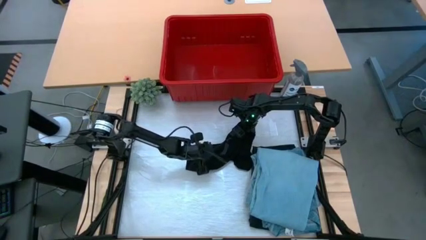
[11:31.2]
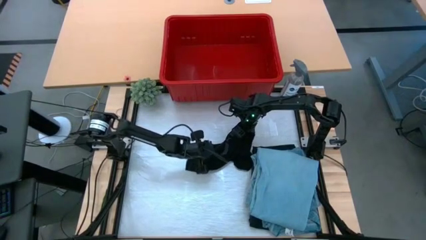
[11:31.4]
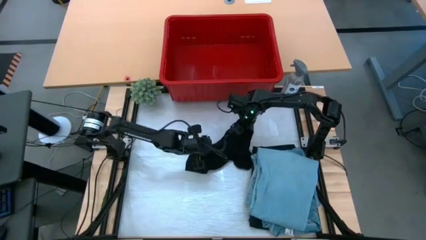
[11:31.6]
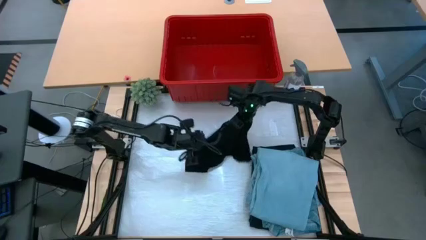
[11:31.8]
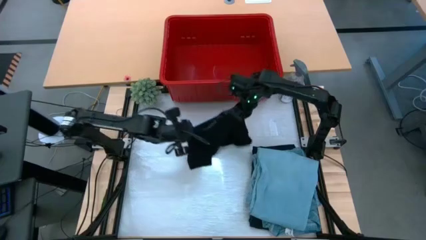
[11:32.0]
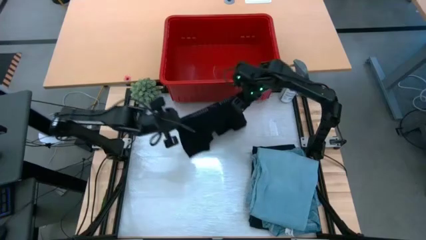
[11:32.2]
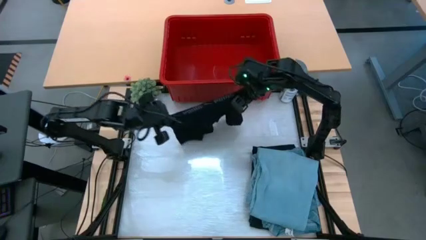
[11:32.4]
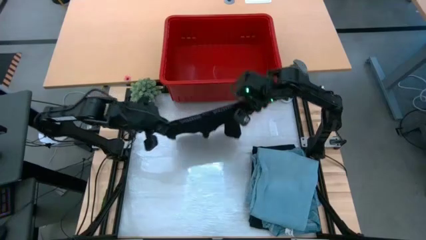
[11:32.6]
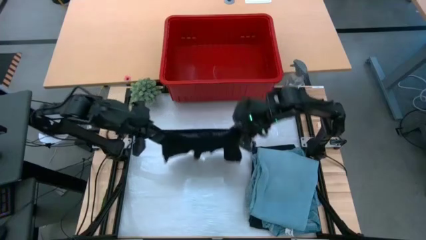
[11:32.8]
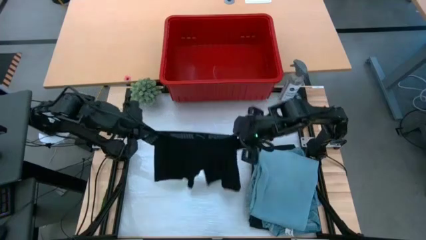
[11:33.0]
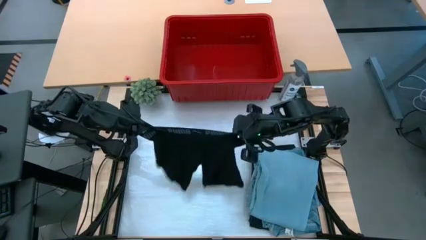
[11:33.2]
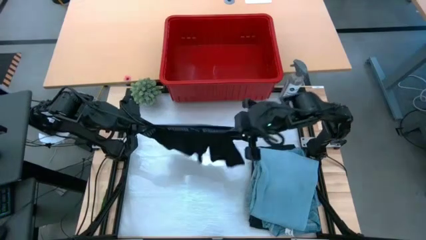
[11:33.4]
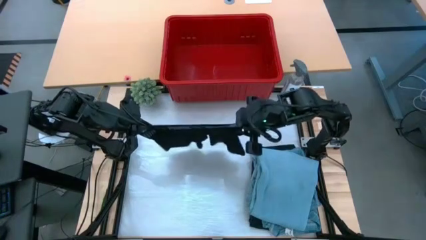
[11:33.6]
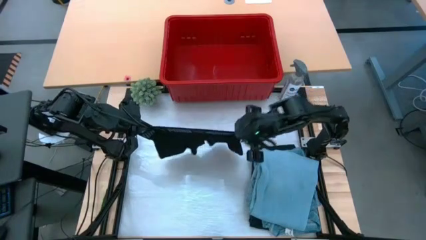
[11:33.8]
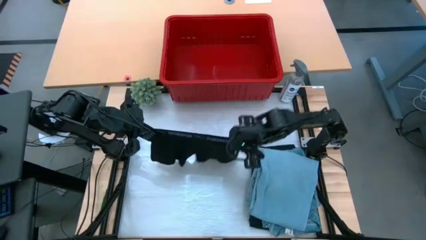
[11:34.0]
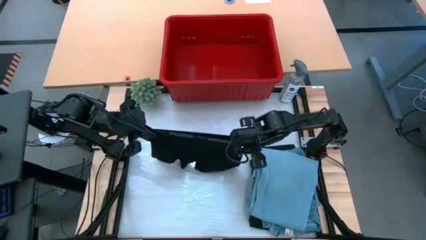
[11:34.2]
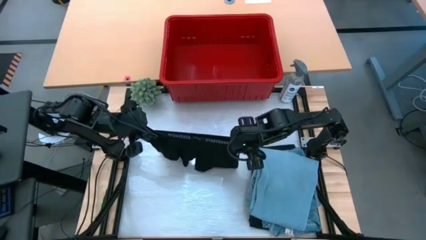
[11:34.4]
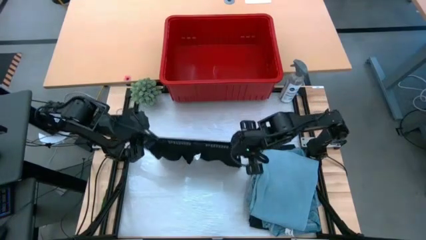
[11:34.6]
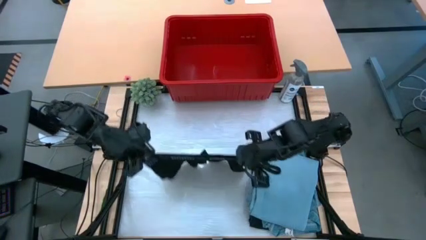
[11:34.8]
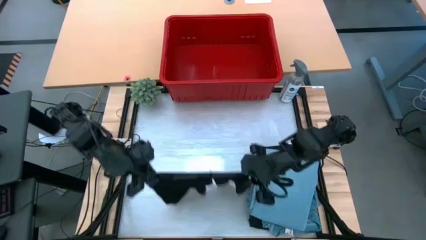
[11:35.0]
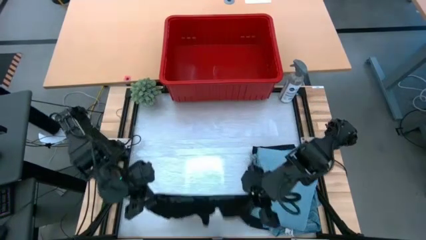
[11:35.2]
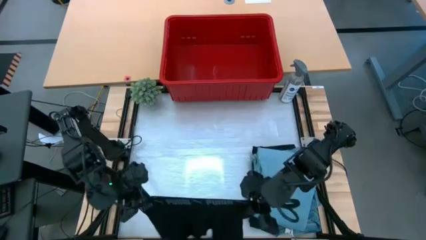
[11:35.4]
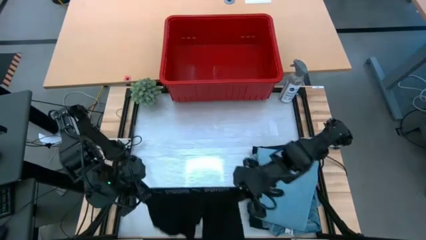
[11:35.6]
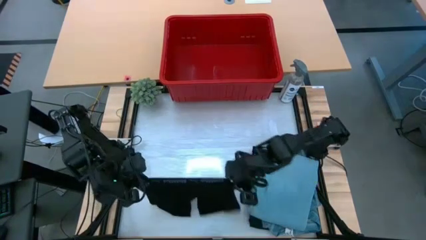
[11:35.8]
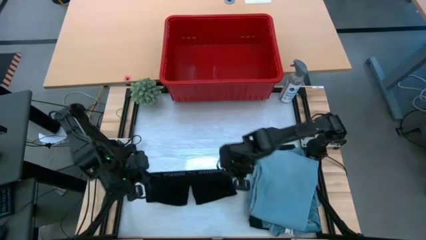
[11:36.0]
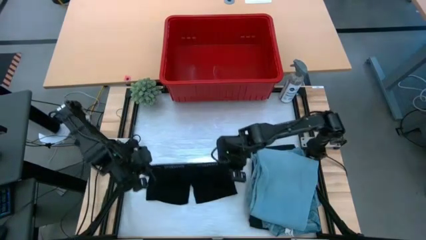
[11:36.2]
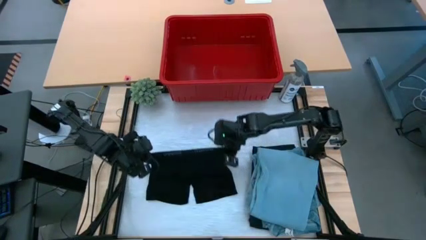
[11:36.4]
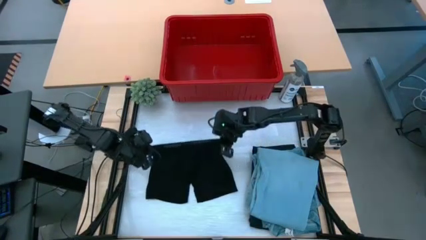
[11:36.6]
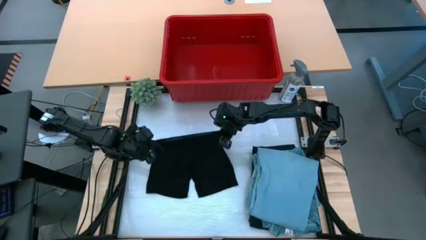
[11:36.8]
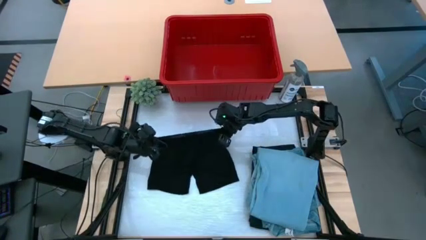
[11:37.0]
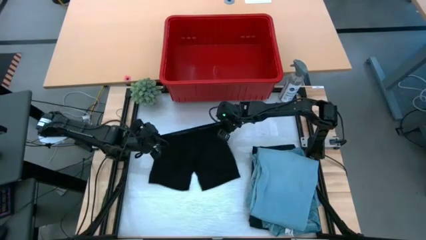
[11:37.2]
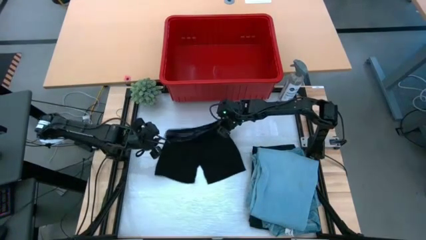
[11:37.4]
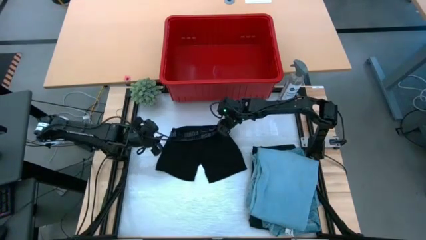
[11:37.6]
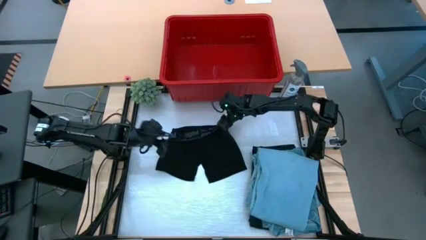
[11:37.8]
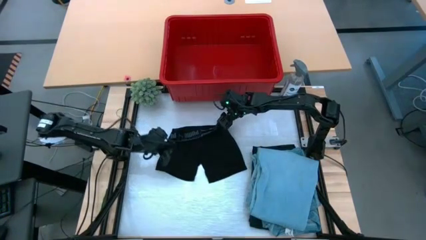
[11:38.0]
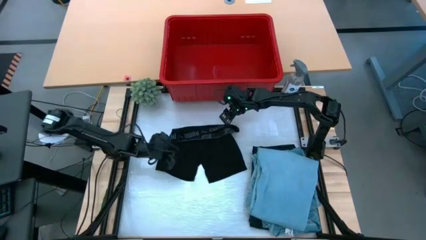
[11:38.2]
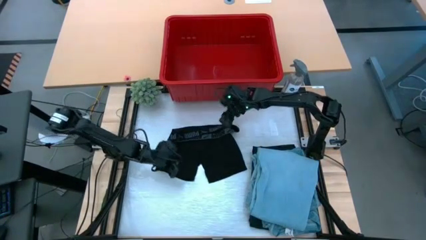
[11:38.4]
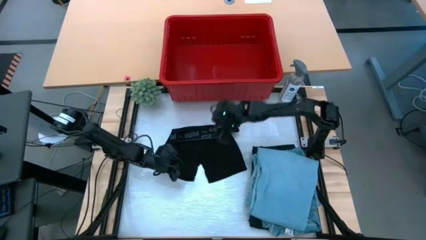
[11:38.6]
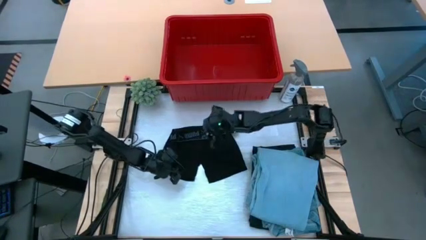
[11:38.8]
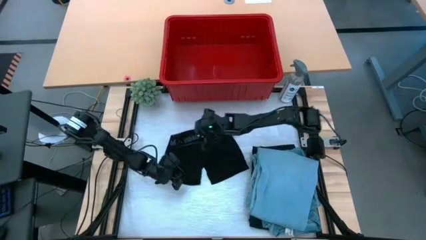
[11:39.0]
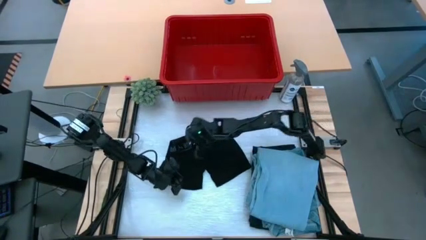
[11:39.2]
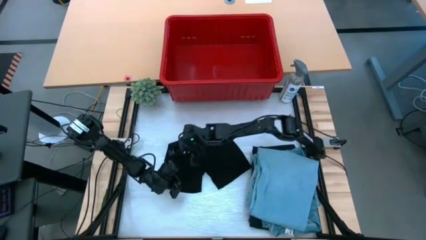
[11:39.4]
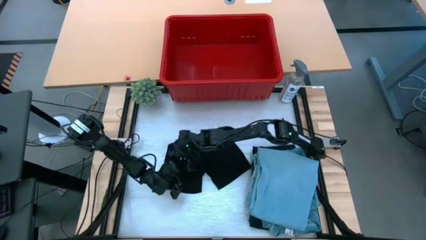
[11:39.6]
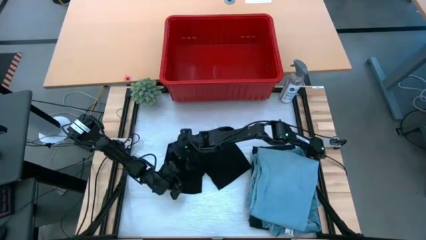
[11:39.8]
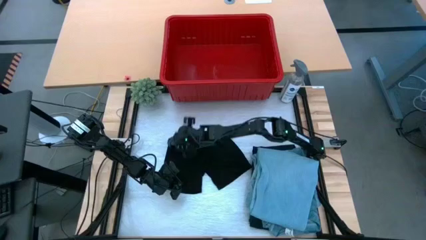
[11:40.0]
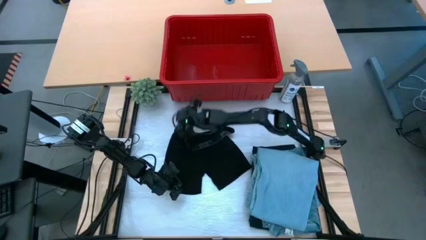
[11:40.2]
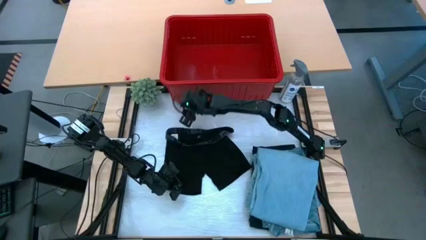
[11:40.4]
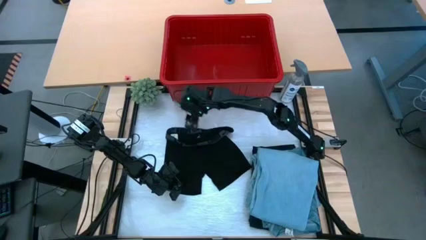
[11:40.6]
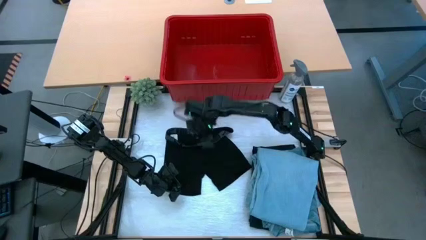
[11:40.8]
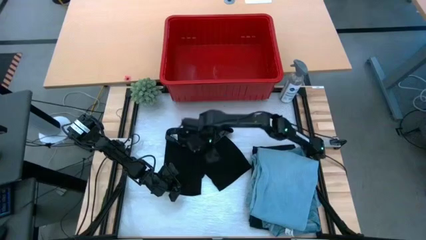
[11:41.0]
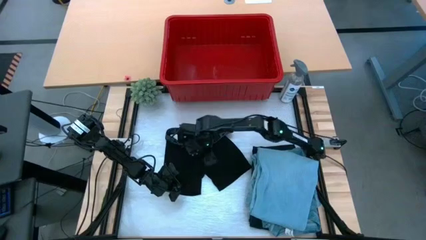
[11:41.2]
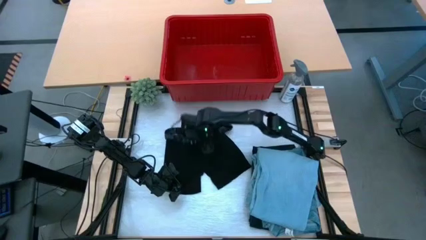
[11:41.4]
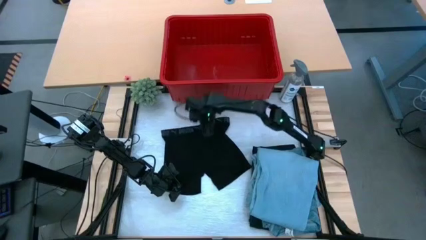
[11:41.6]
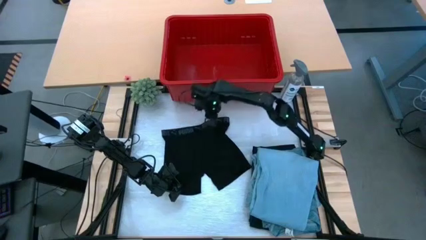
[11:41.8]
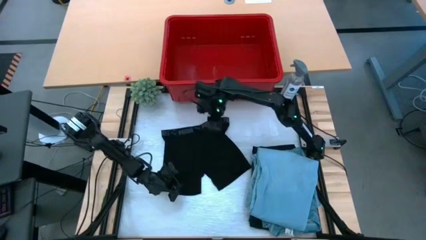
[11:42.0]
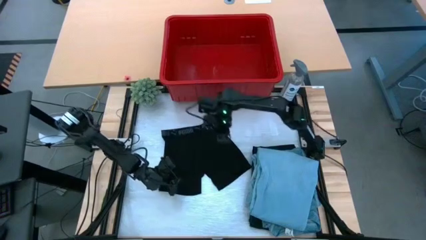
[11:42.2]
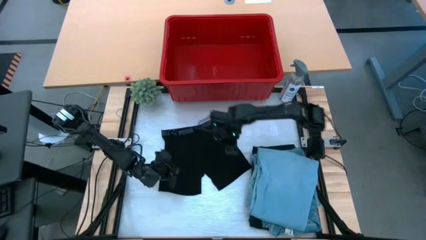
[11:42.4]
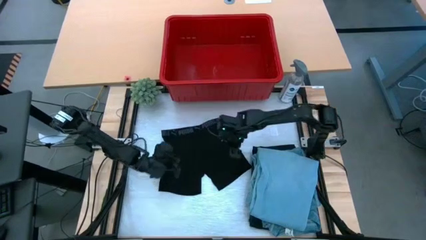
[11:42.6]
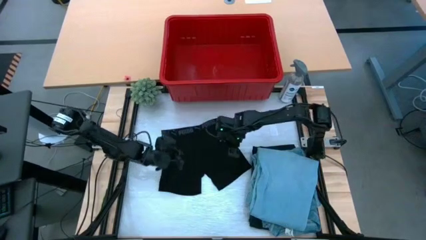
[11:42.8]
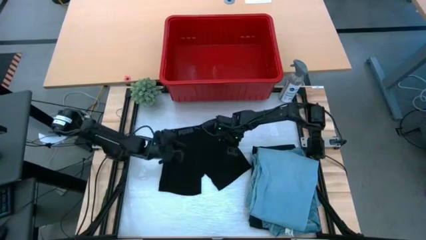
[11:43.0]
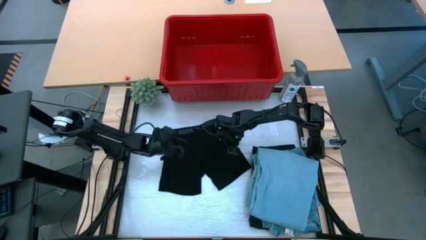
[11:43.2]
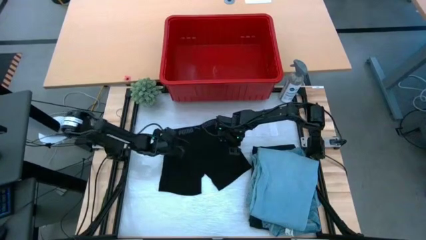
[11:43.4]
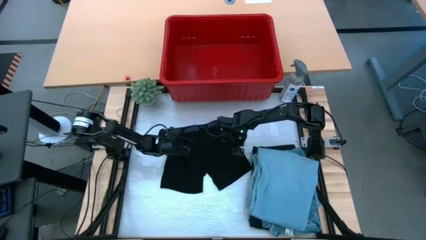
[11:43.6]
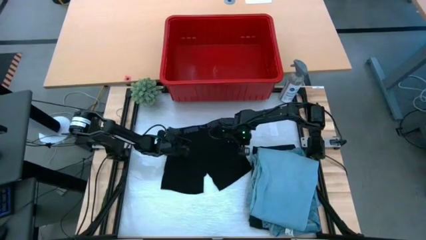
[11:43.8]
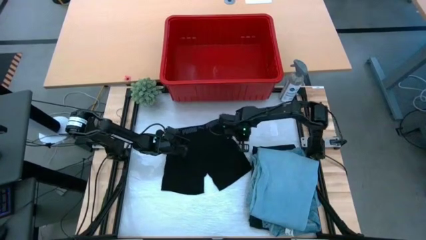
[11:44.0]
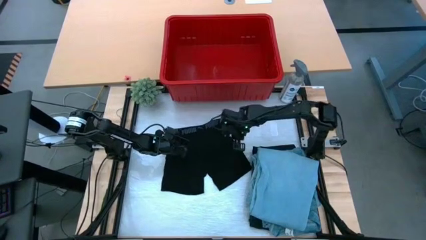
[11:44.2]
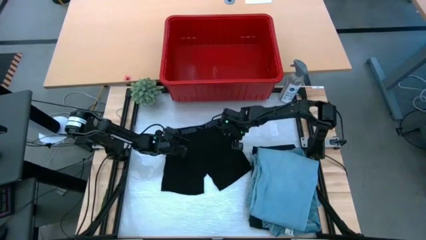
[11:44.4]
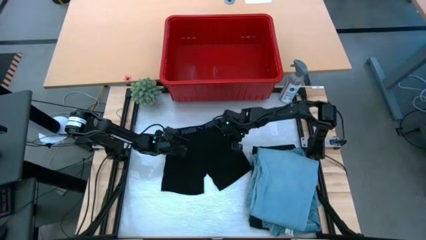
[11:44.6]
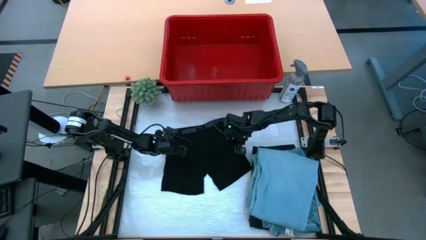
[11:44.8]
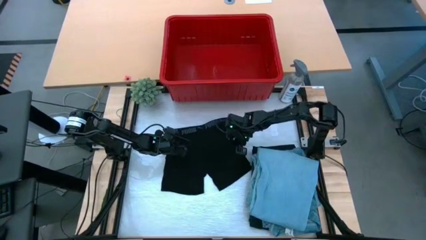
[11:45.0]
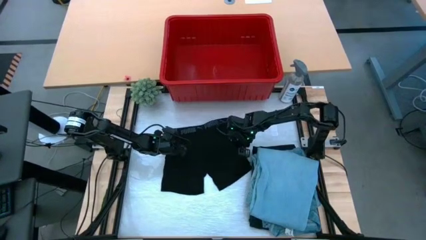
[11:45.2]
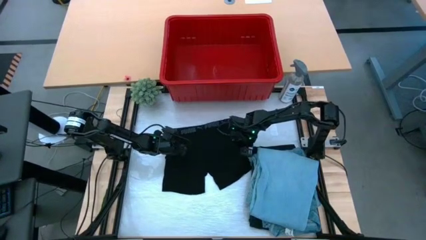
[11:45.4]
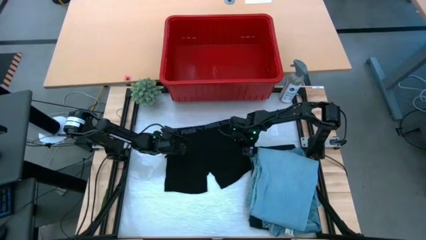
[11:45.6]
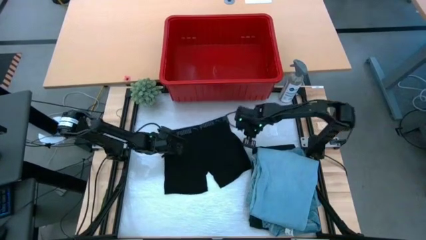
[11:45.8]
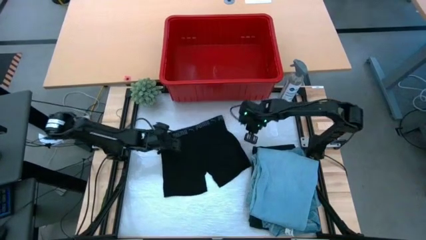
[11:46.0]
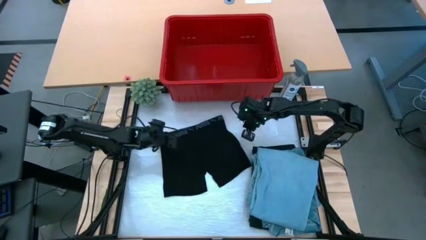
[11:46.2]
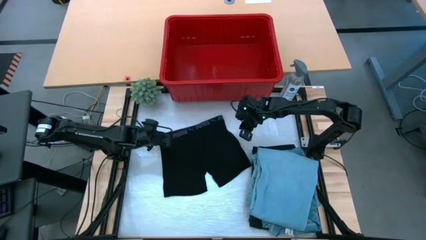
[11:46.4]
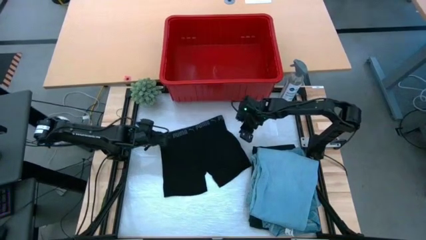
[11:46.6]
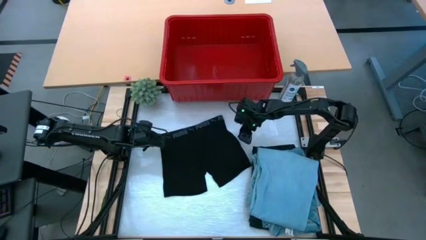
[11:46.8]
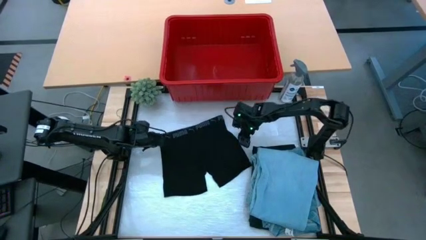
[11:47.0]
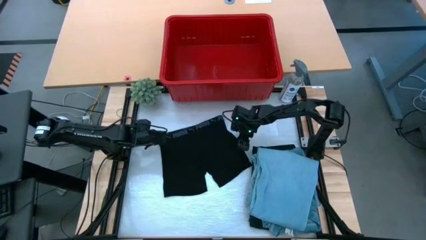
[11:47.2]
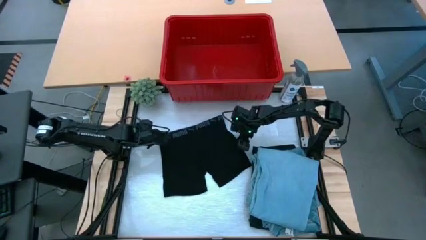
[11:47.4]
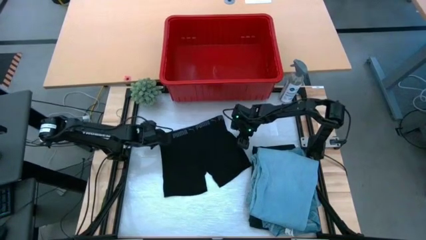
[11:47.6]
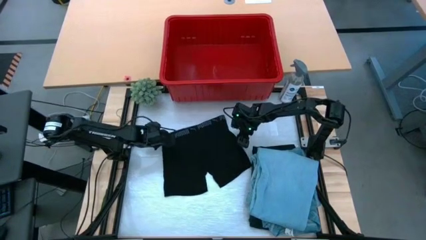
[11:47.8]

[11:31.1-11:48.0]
Task: Fold Laundry from Bin
Fold the black boxer
